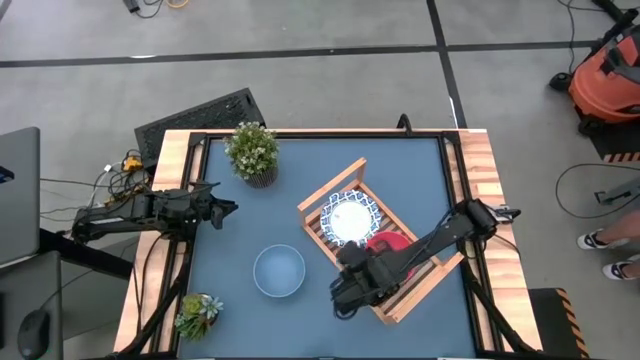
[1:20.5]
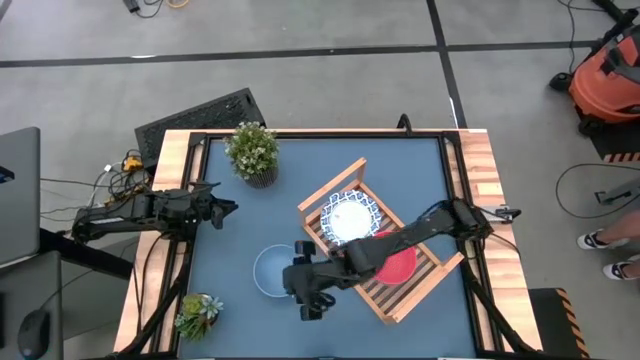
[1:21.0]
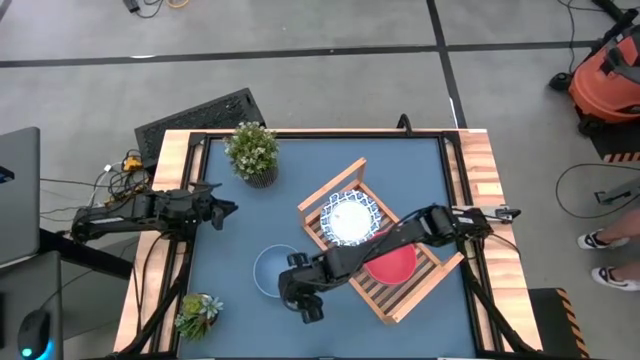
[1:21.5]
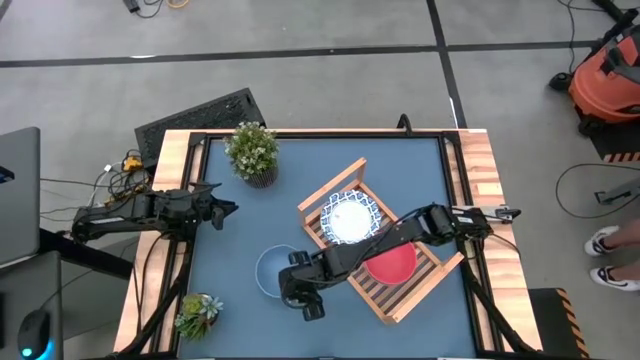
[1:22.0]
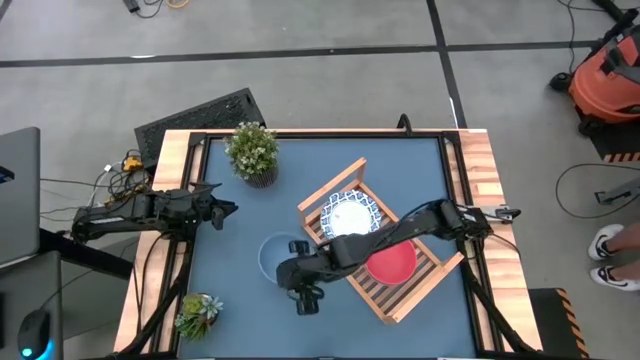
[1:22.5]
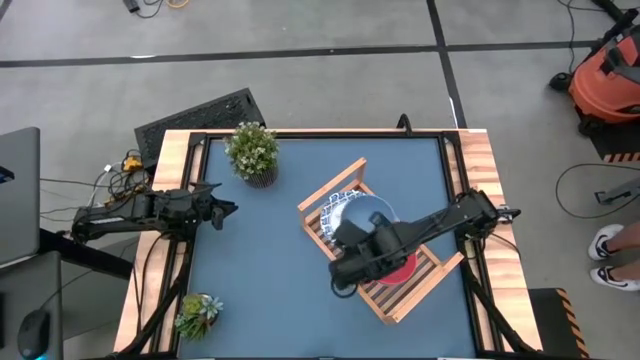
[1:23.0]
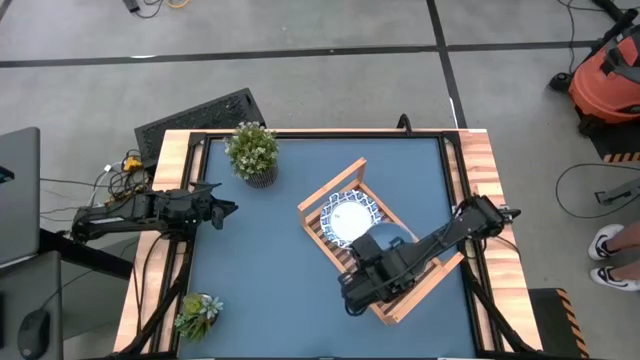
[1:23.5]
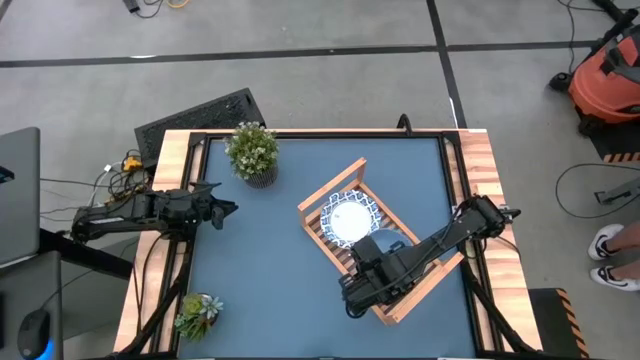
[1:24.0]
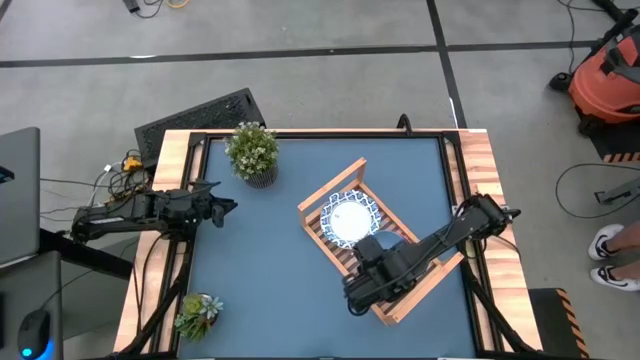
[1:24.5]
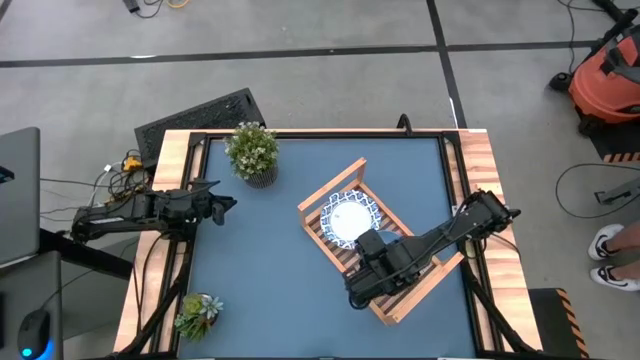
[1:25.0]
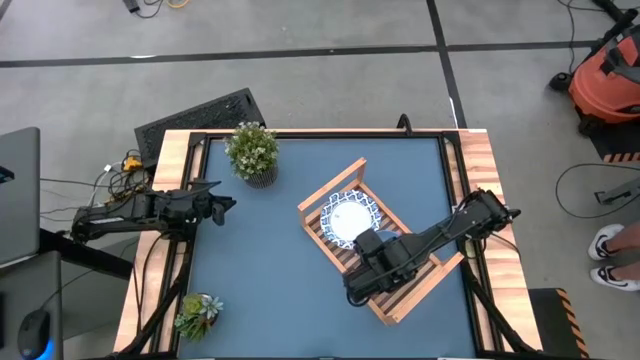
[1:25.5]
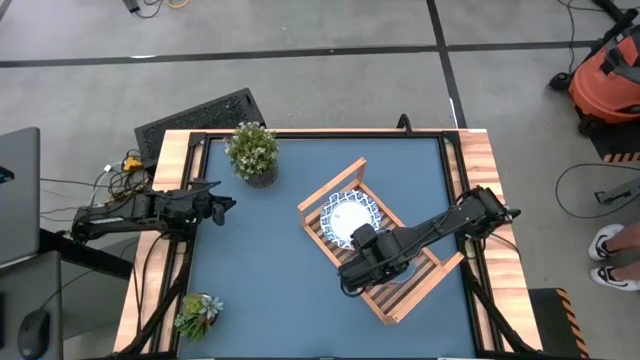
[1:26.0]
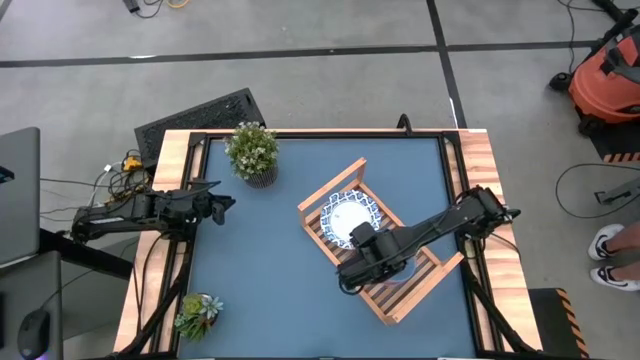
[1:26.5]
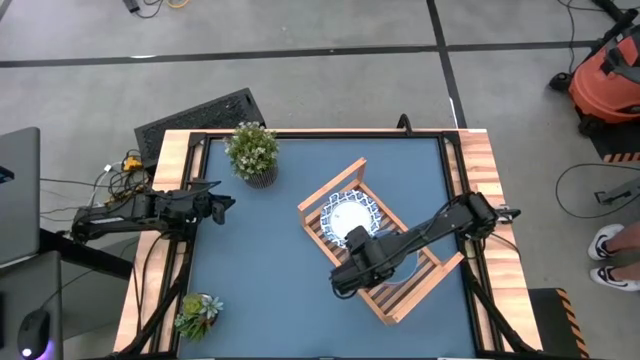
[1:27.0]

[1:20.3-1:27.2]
Task: Place and stack bowls onto a shelf
Stack the blue bowl on the top of the orange bowl on the shelf

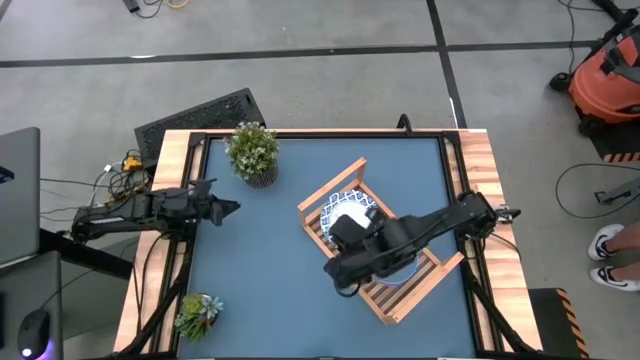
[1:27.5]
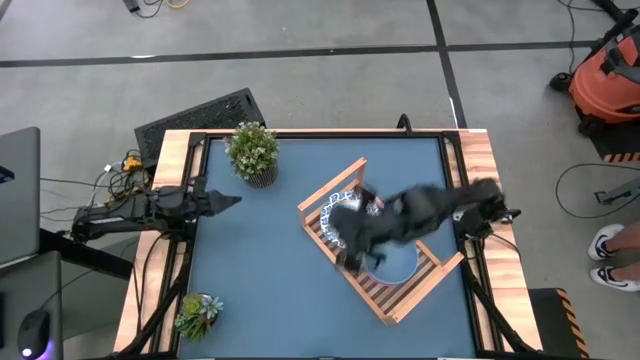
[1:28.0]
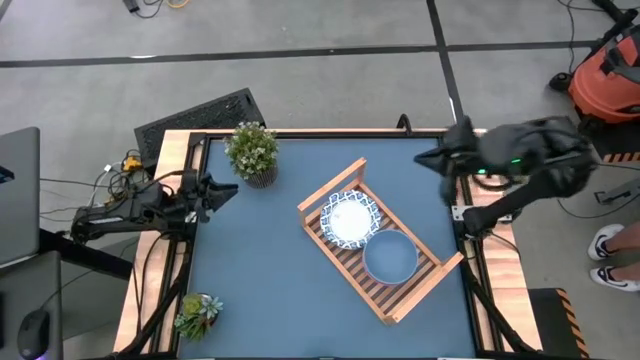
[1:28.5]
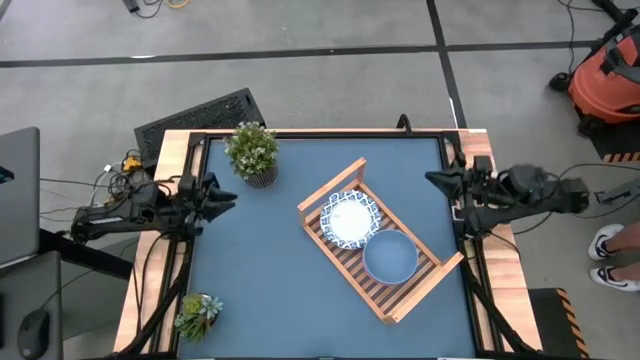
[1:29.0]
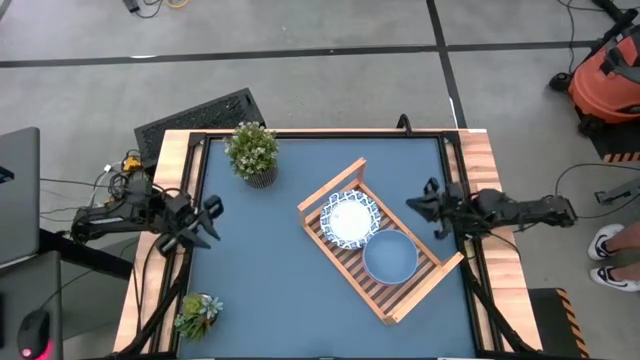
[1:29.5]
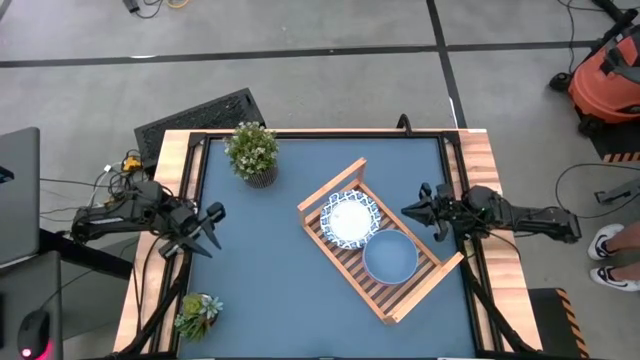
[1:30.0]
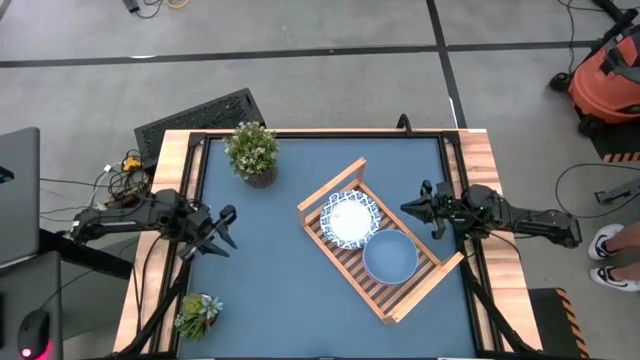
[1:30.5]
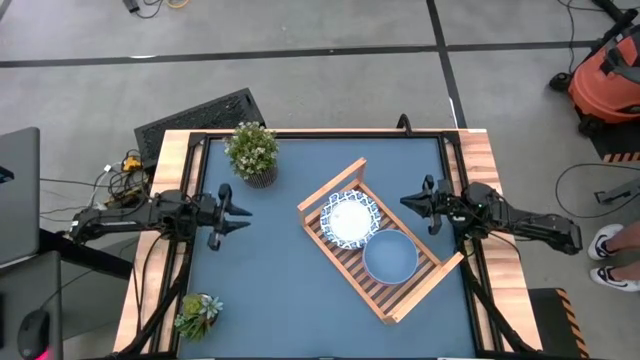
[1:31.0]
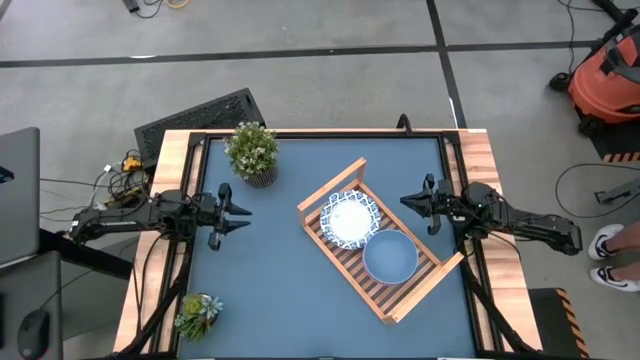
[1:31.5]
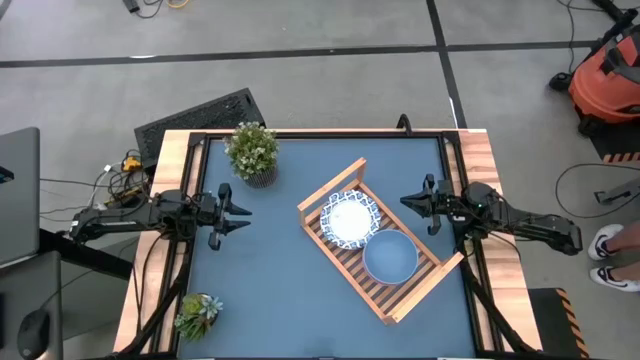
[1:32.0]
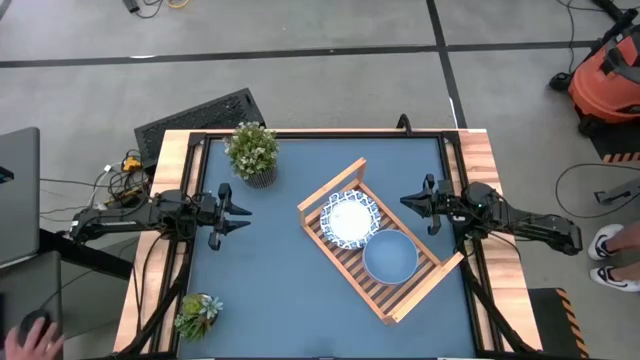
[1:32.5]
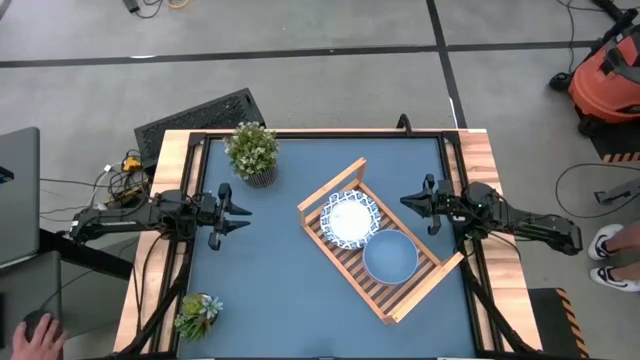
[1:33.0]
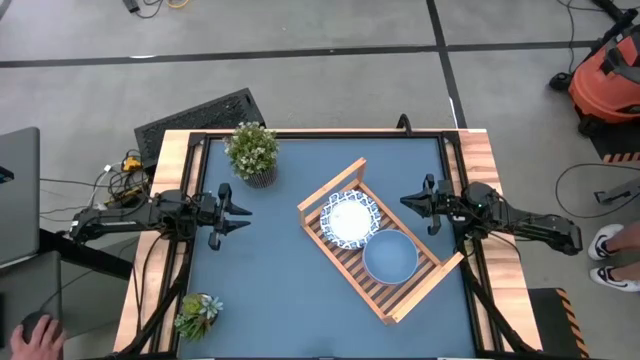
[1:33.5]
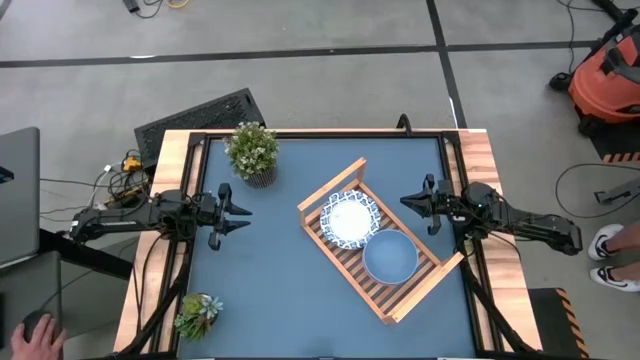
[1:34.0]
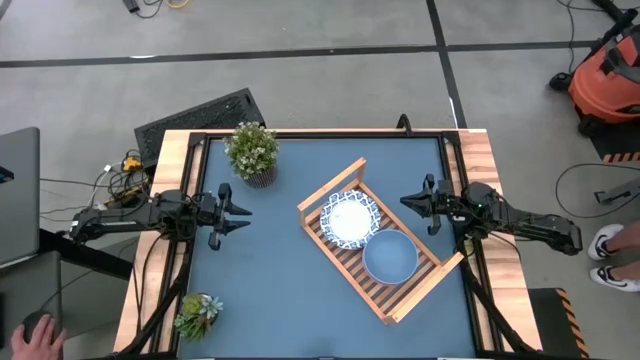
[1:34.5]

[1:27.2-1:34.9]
Return to Home Position

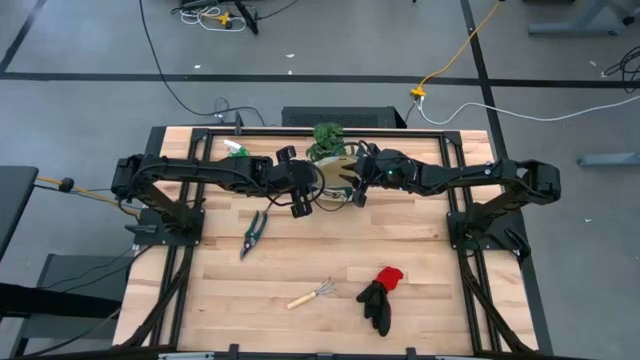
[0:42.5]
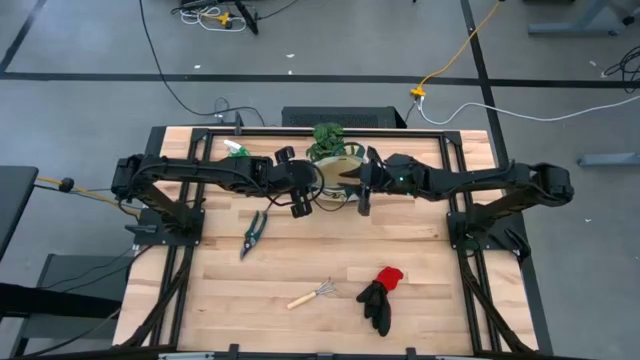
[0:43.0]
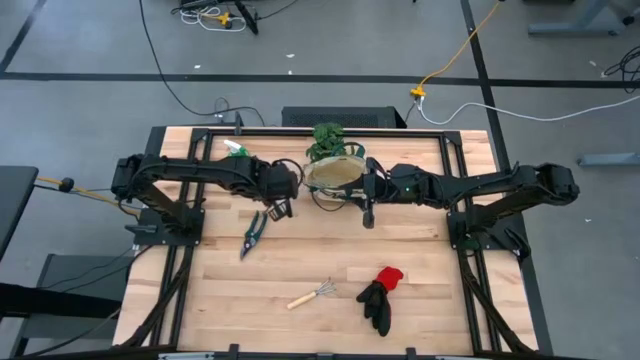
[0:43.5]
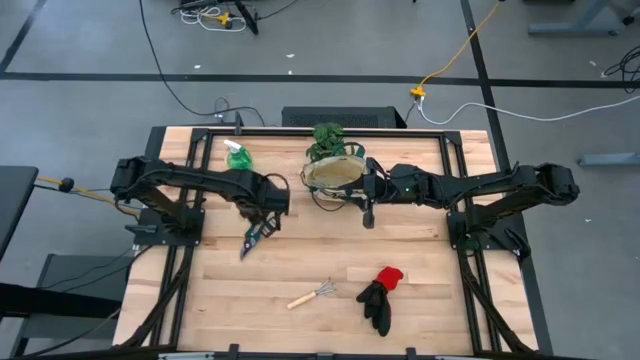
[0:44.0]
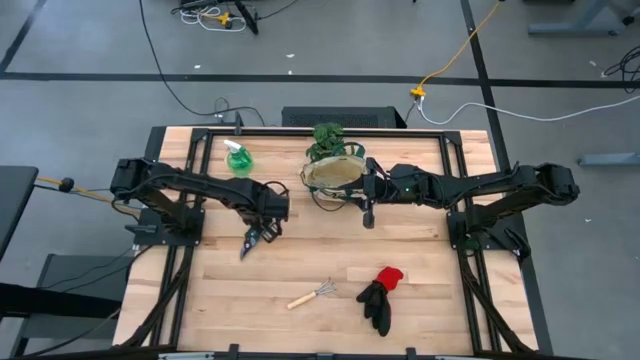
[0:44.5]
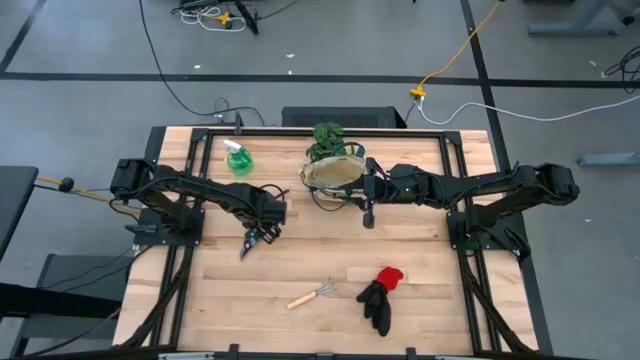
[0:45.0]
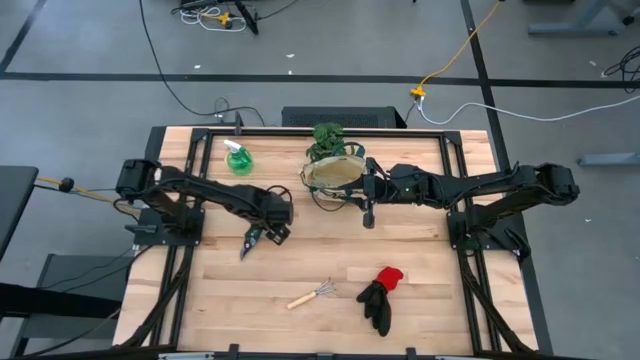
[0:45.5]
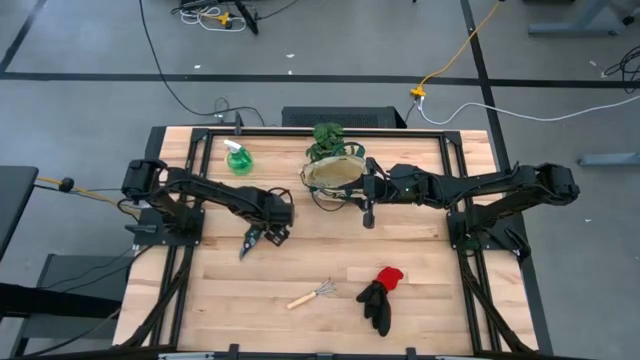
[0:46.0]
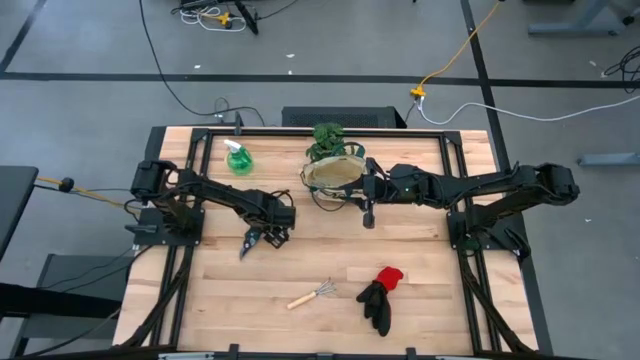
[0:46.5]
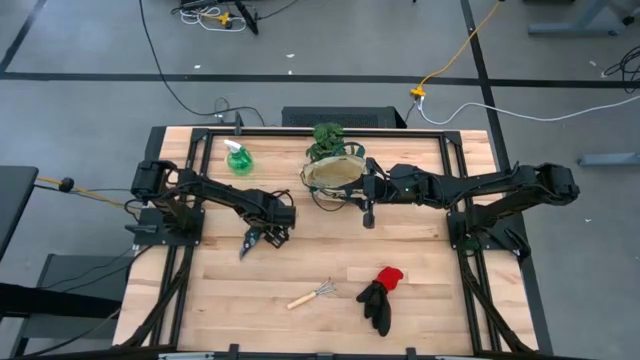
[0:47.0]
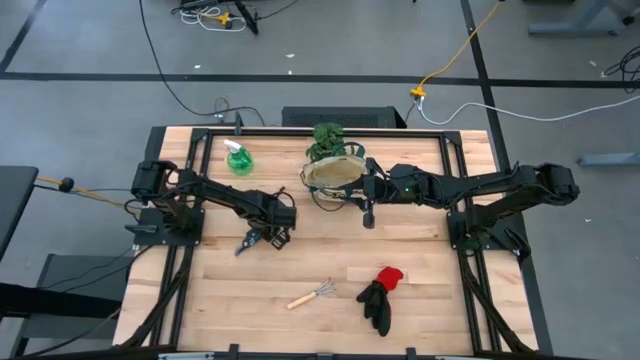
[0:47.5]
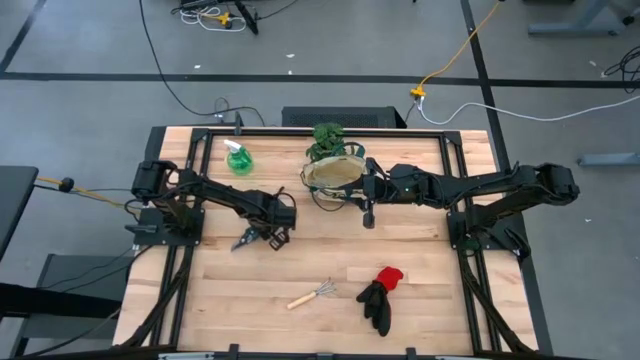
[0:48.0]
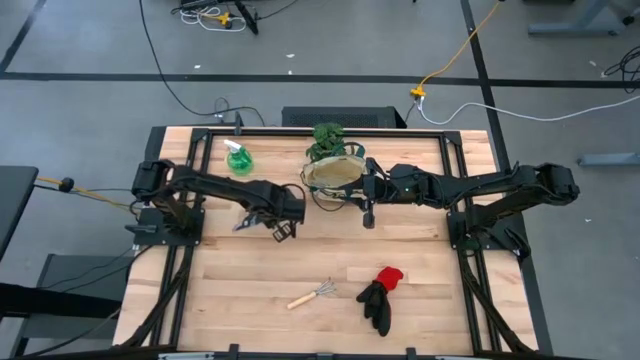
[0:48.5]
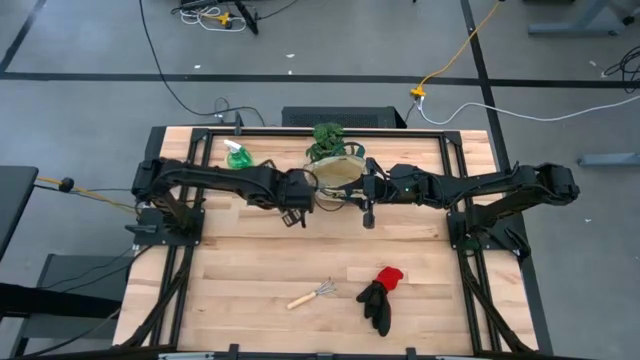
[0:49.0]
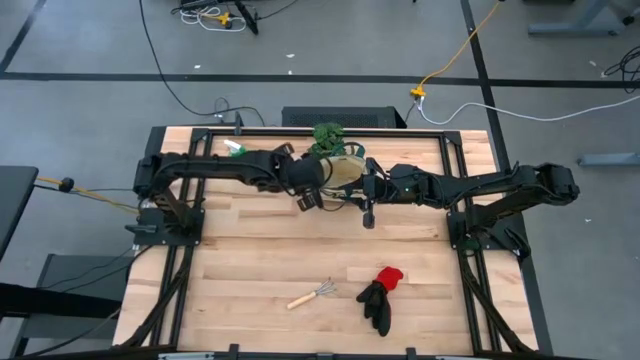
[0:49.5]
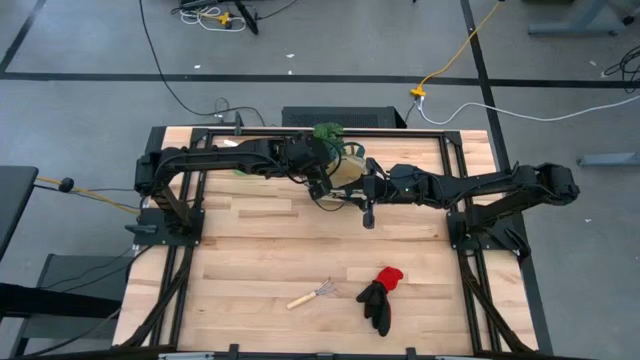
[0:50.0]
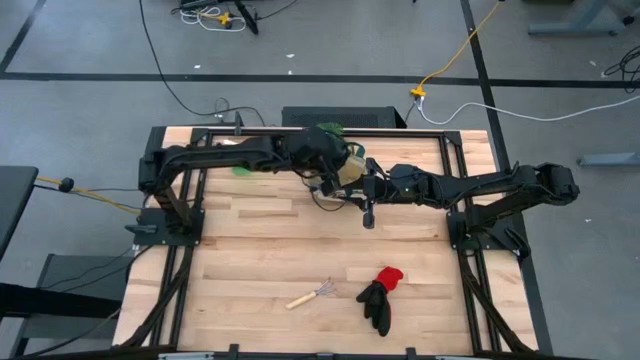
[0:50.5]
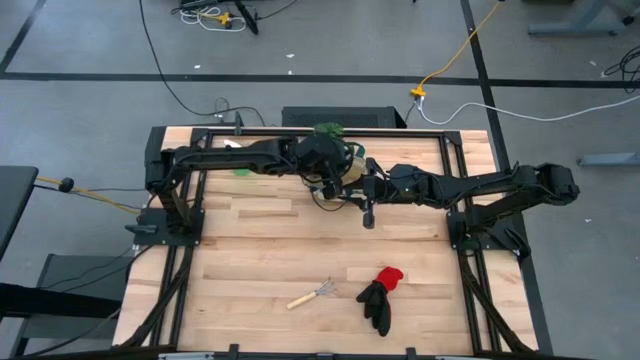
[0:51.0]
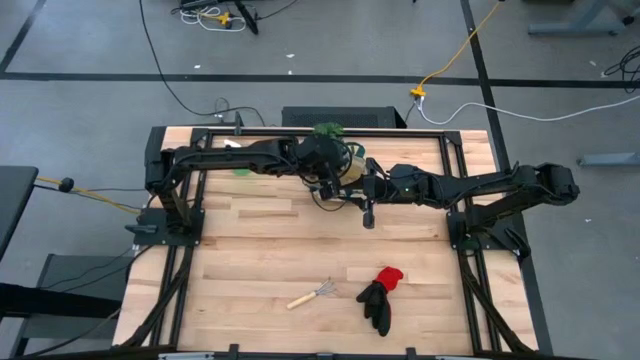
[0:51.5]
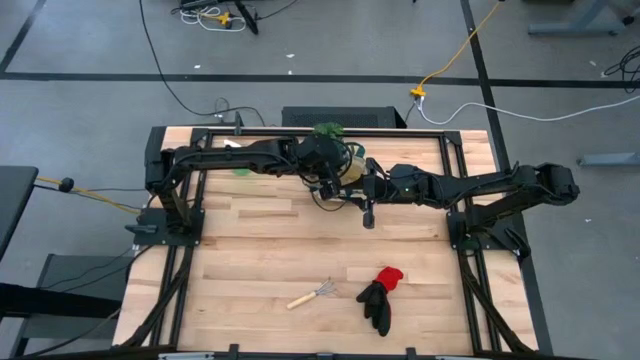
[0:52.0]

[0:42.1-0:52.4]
Task: Pick & Place Garden tools in Gardening bag
Put the green shear scissors into the green gardening bag
